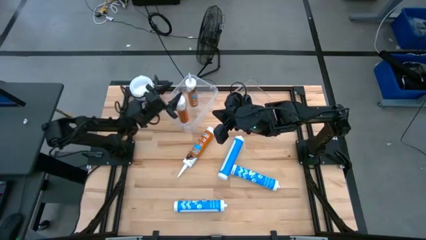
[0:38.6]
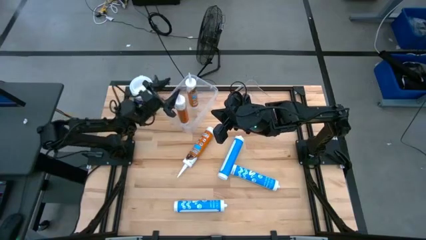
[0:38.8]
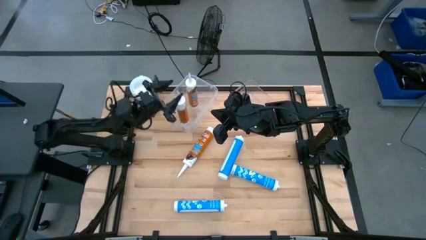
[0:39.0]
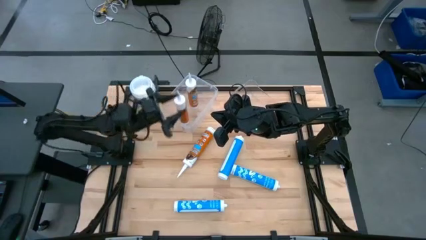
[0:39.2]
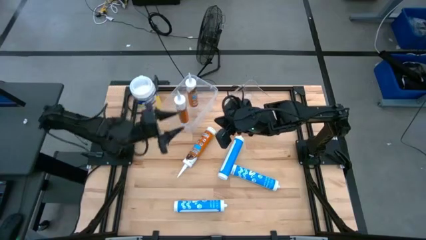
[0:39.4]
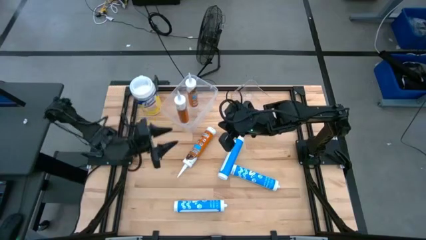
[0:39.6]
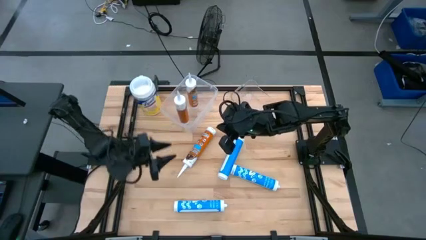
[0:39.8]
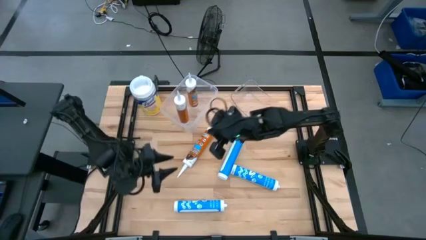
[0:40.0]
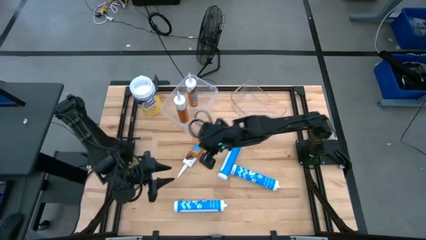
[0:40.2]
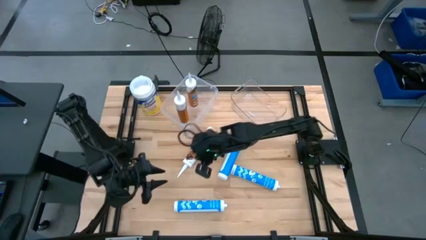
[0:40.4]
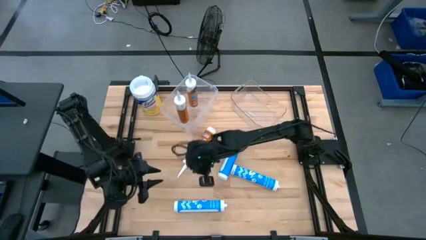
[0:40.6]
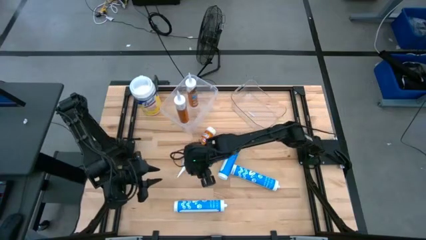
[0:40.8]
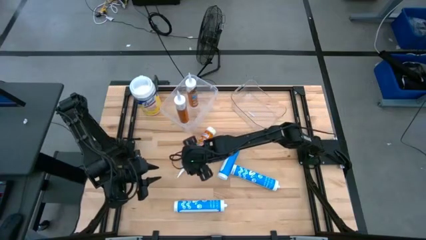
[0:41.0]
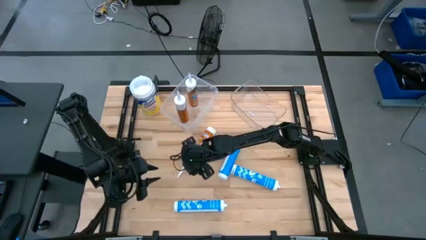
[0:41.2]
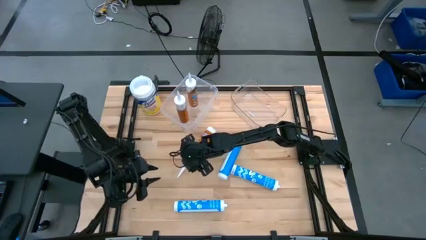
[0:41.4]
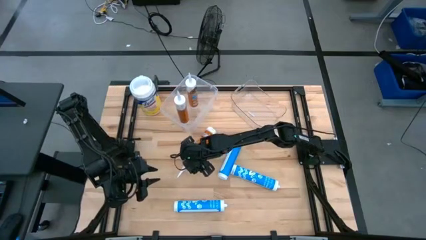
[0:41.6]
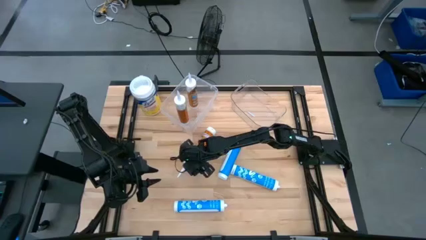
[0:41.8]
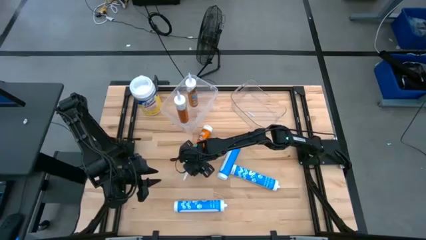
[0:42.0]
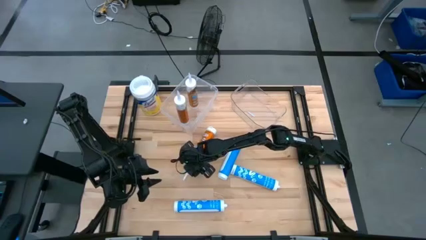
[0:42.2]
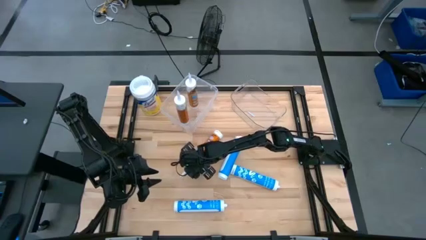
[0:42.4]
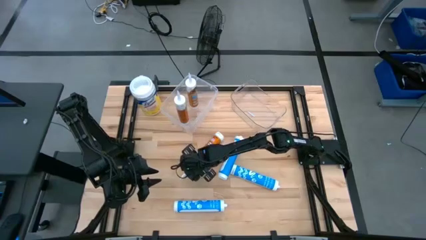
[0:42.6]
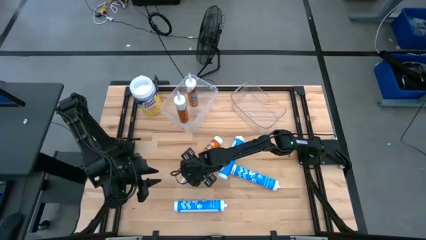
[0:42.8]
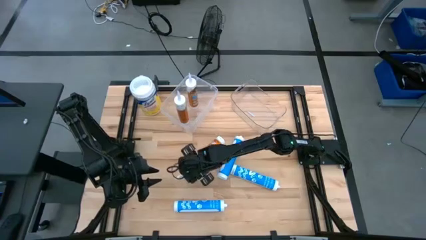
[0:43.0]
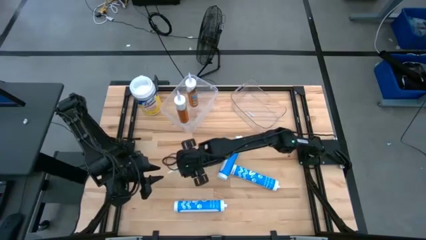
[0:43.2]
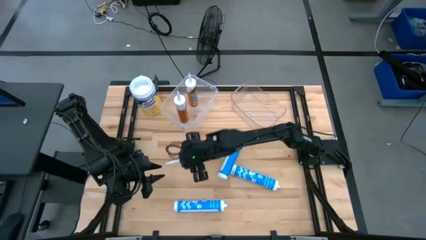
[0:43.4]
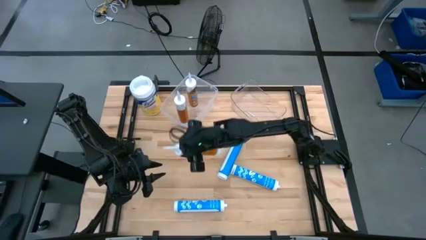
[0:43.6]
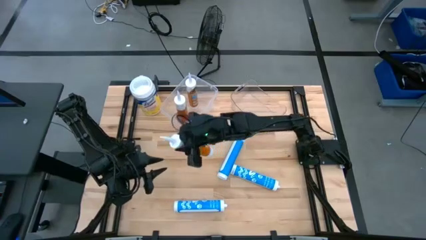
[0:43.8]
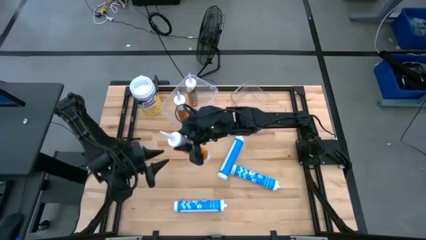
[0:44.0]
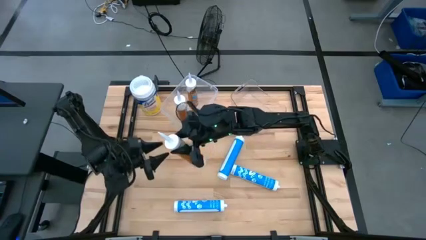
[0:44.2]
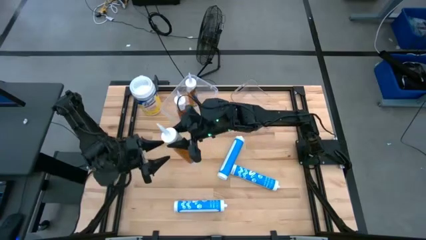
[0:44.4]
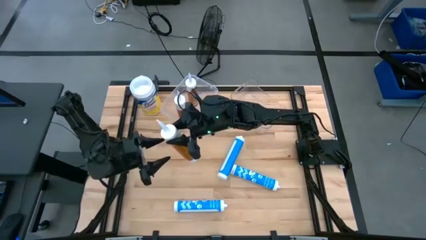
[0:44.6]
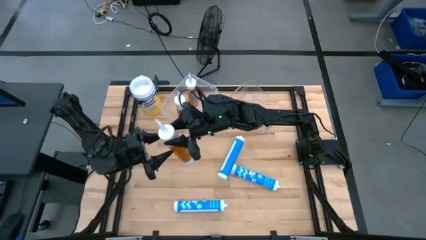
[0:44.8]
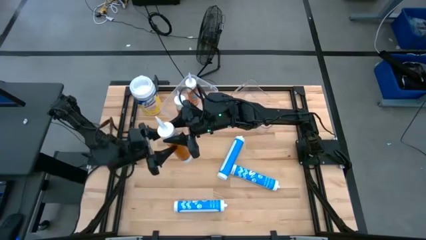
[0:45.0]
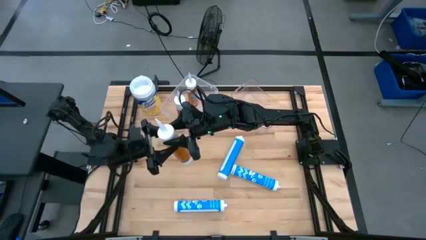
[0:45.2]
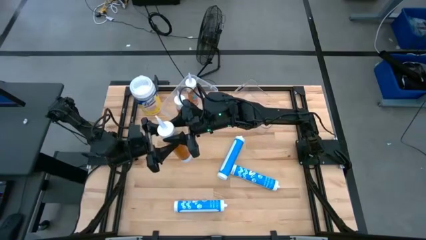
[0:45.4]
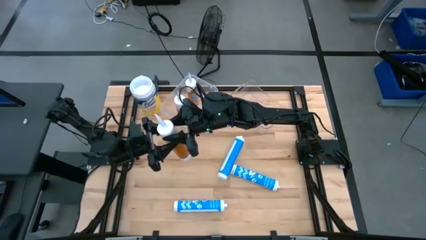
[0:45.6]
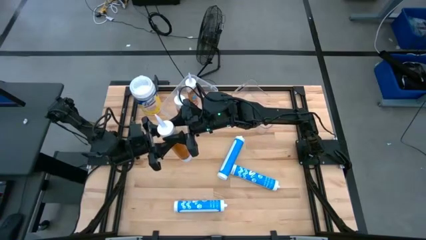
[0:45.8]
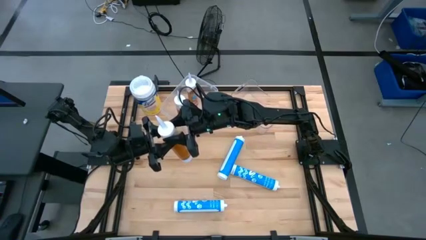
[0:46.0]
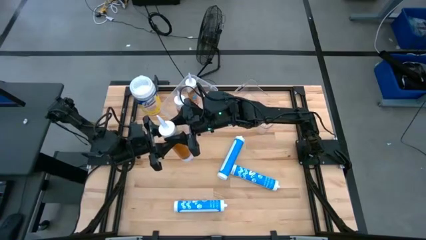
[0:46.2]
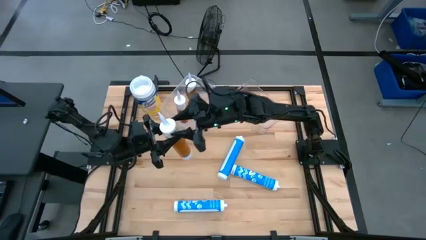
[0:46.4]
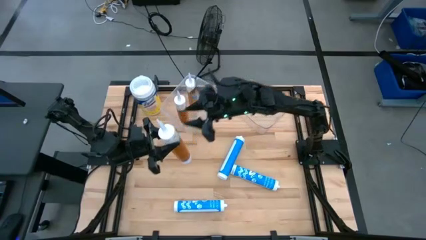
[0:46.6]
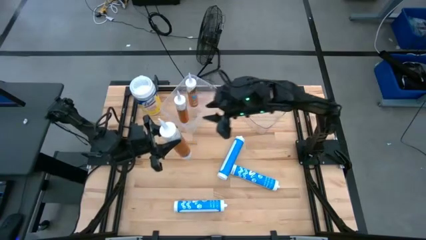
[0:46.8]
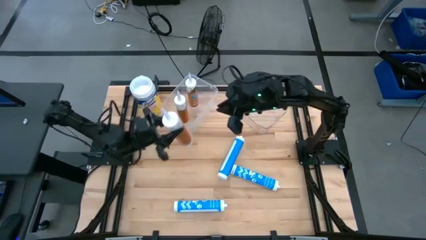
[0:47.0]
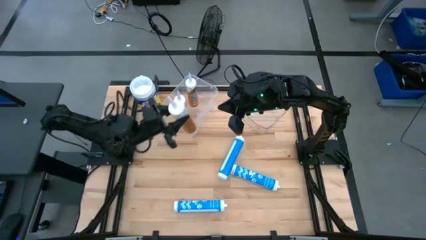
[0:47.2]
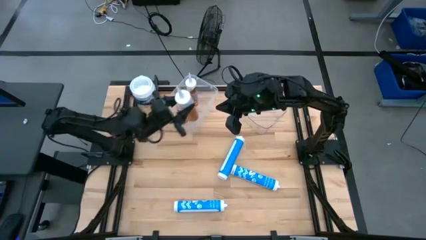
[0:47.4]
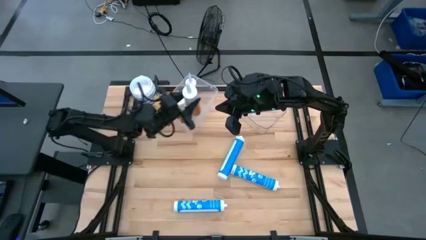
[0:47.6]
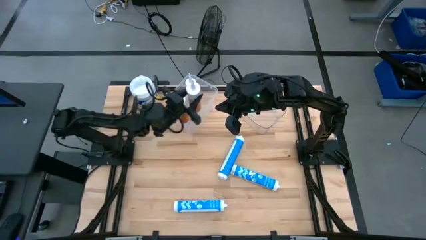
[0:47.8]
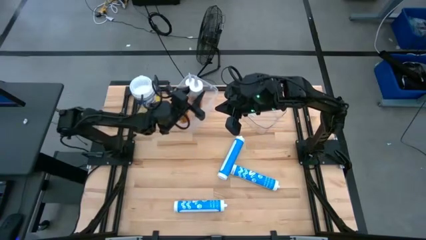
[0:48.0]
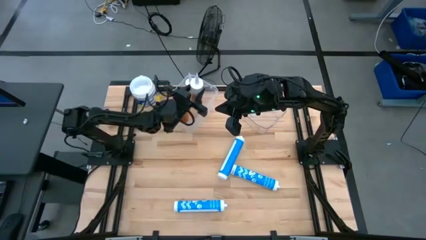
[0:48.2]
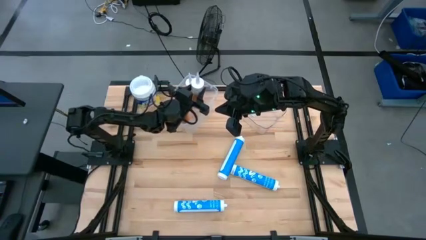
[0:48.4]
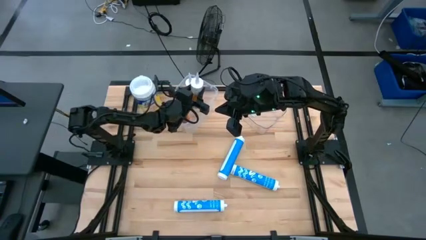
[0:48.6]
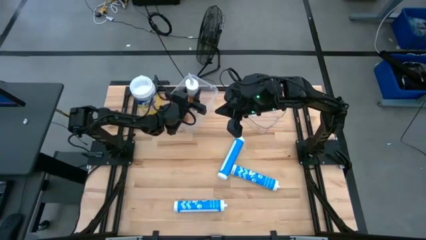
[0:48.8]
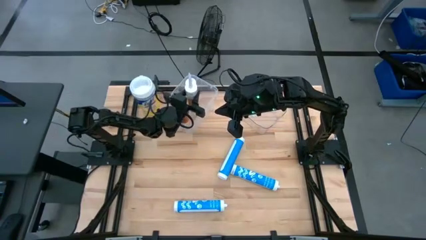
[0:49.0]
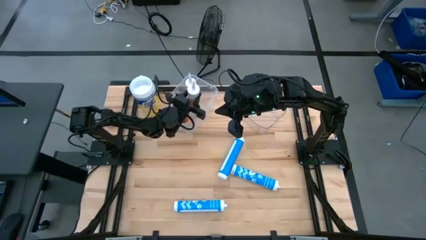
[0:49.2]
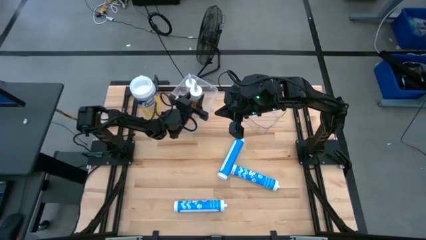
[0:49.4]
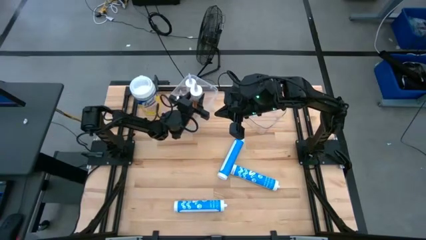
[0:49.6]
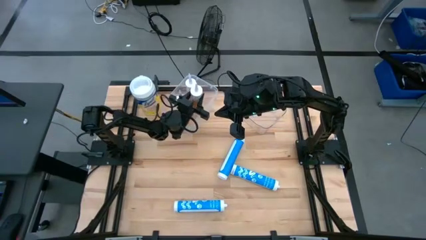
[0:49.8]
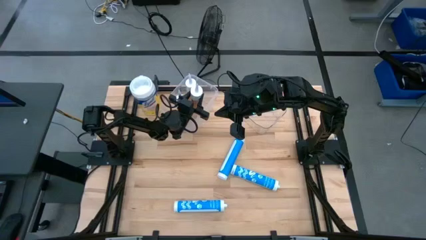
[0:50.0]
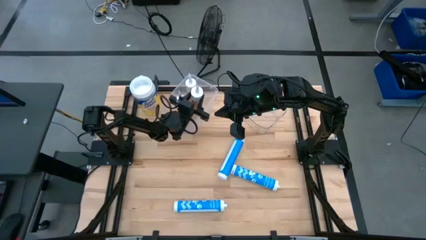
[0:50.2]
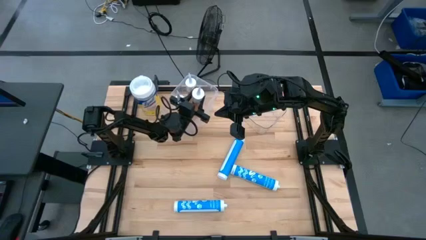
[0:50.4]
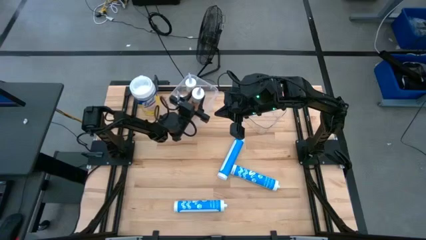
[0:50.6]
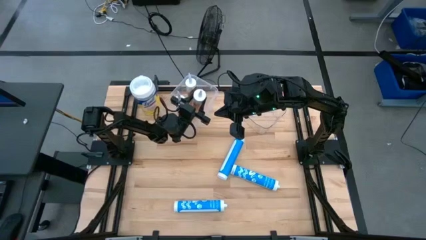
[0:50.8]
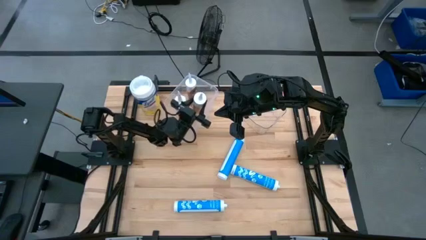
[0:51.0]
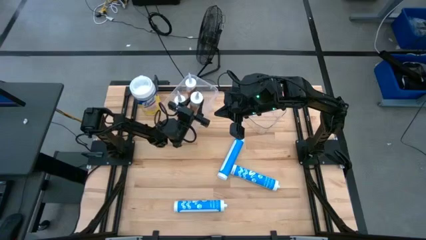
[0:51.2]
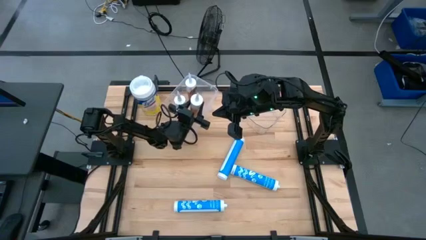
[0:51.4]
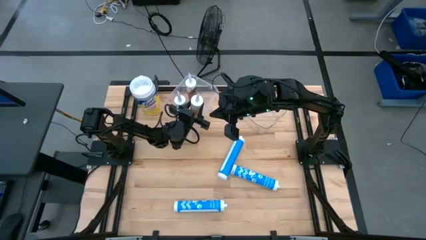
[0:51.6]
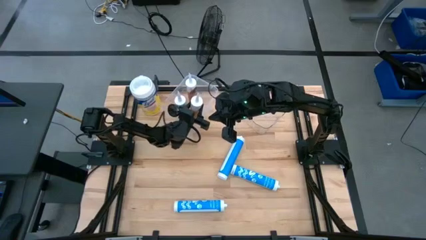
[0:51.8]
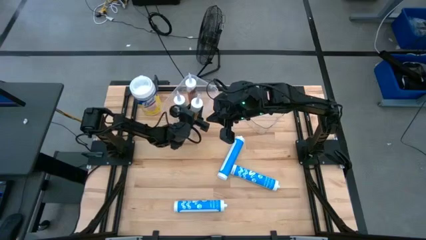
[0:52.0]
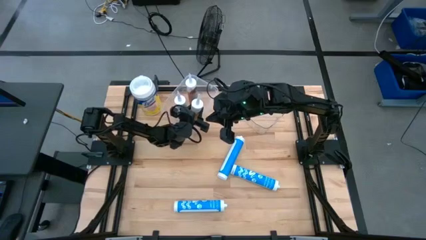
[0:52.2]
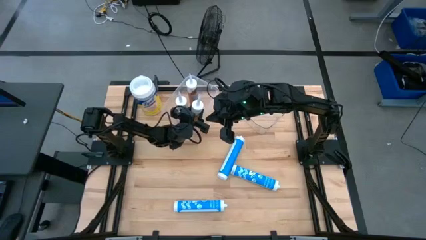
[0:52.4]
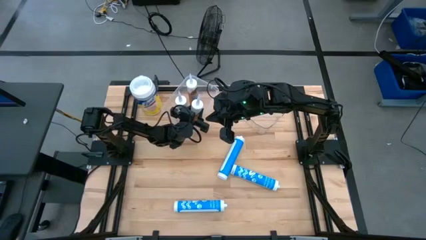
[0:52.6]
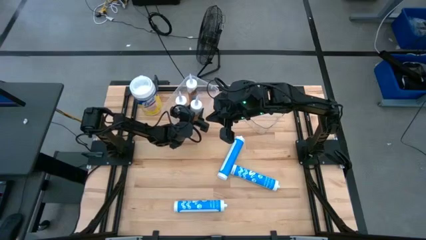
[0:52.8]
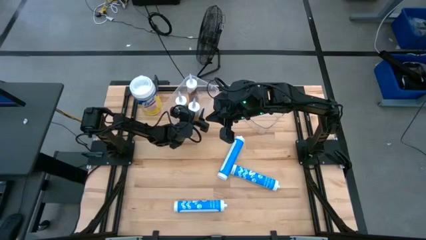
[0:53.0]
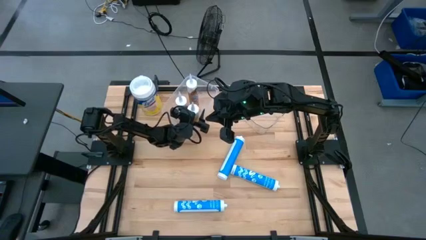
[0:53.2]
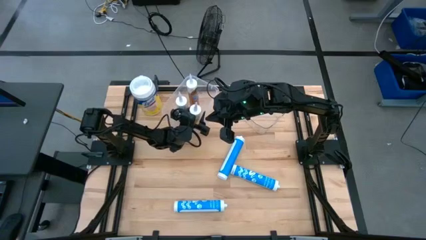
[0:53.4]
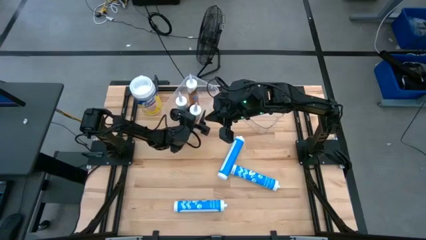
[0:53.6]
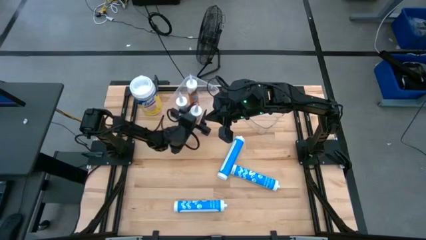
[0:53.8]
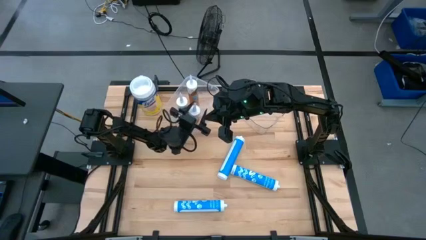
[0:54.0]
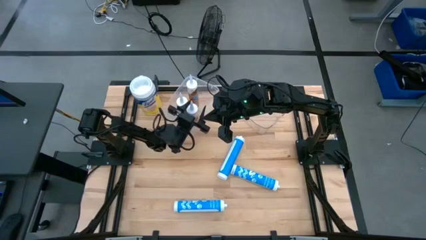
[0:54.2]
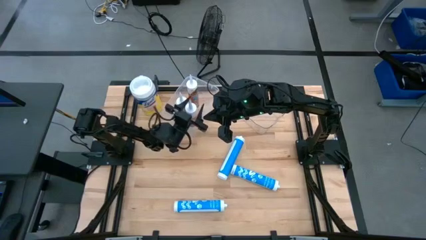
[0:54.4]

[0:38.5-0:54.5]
Task: Pick & place silicon tubes, Sealant and Lysol wipes
Put the brown sealant into the white transparent bin
